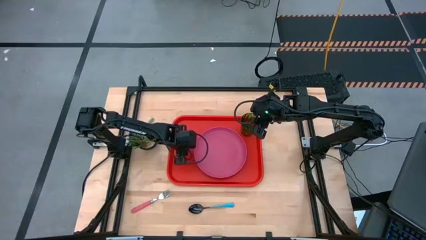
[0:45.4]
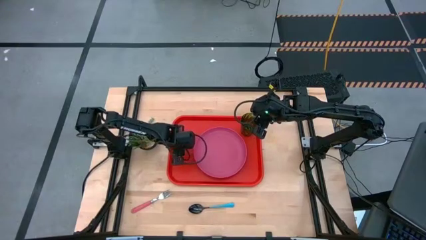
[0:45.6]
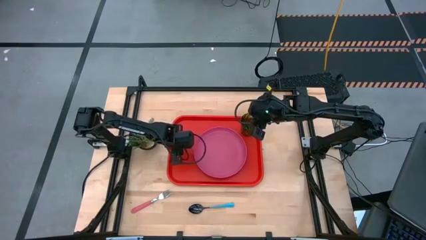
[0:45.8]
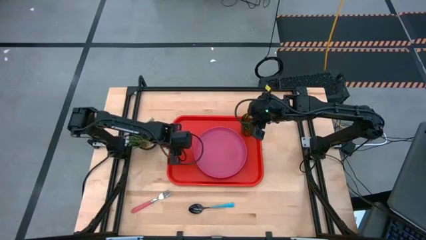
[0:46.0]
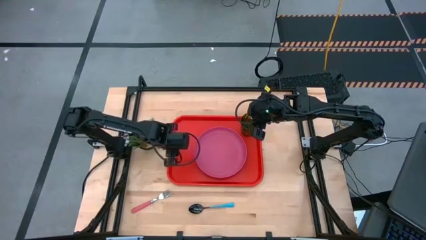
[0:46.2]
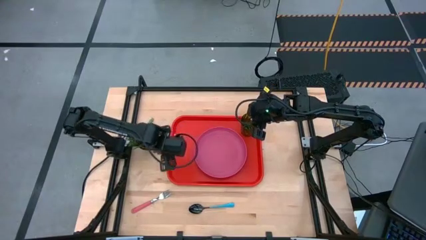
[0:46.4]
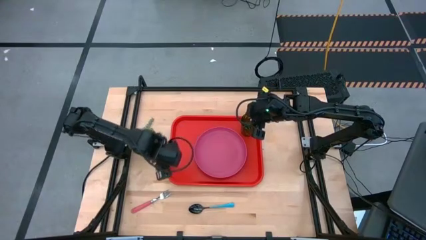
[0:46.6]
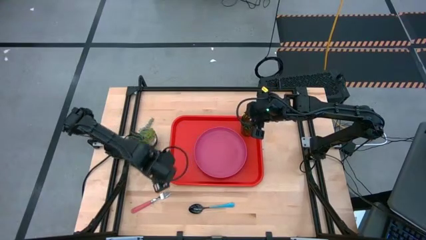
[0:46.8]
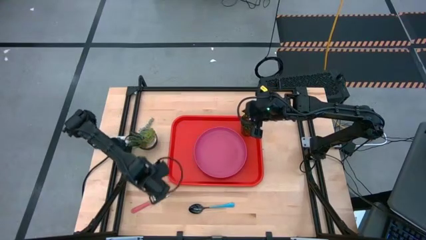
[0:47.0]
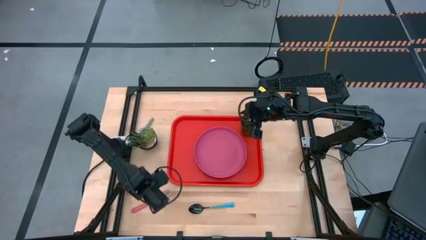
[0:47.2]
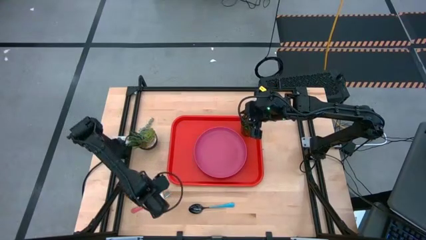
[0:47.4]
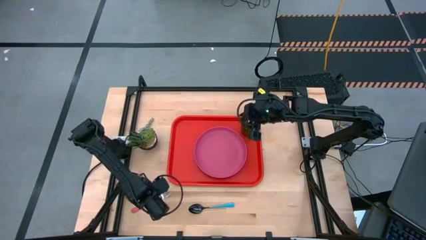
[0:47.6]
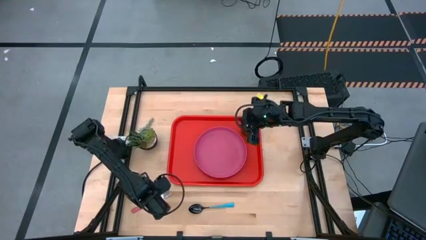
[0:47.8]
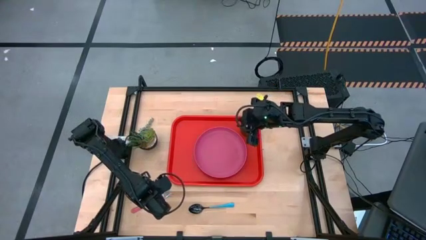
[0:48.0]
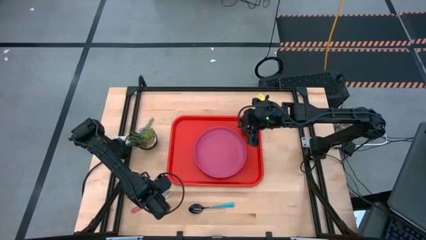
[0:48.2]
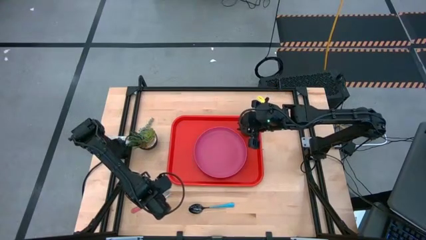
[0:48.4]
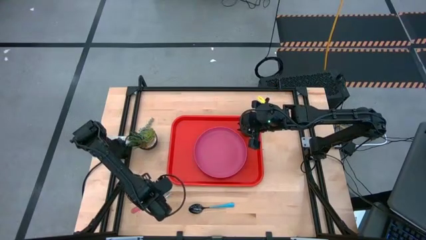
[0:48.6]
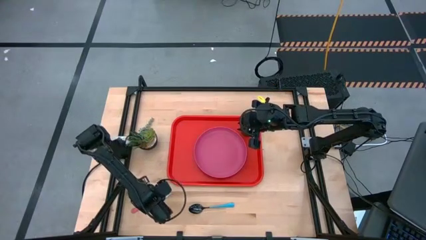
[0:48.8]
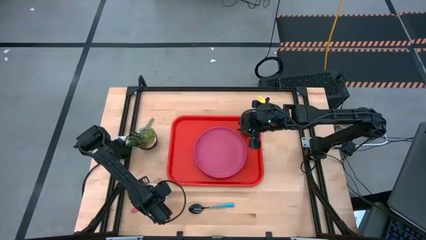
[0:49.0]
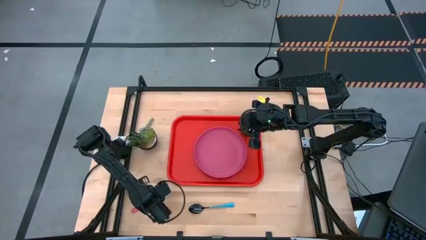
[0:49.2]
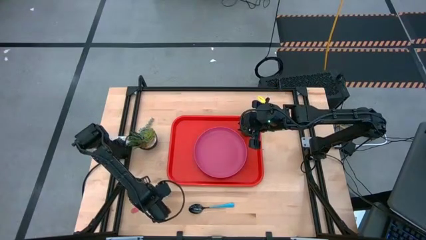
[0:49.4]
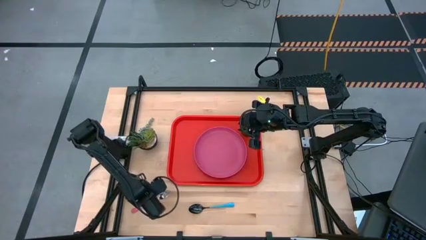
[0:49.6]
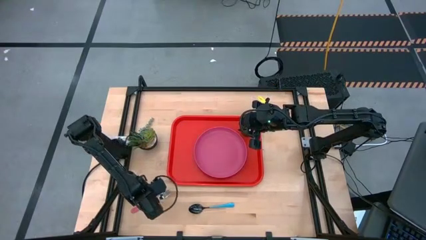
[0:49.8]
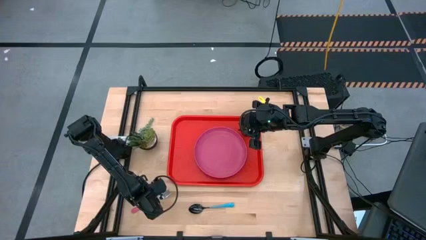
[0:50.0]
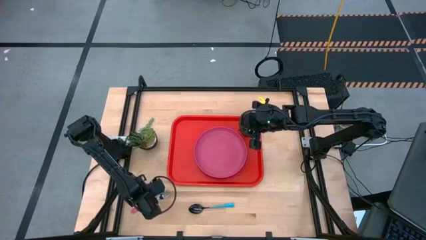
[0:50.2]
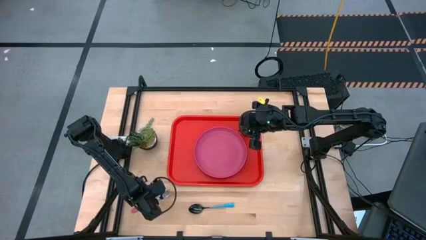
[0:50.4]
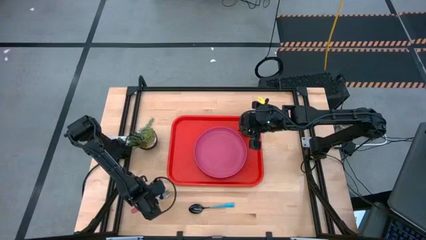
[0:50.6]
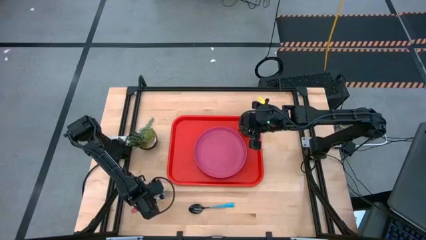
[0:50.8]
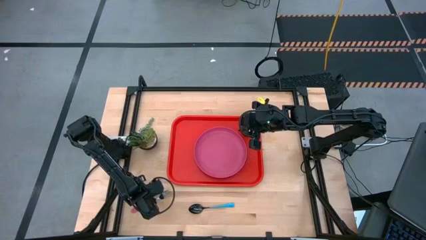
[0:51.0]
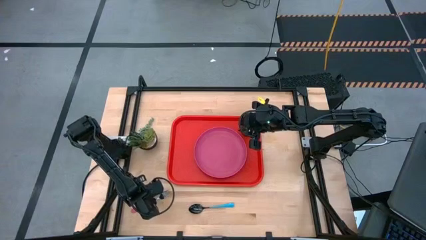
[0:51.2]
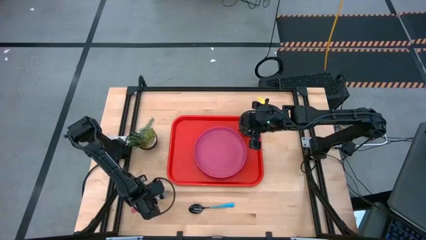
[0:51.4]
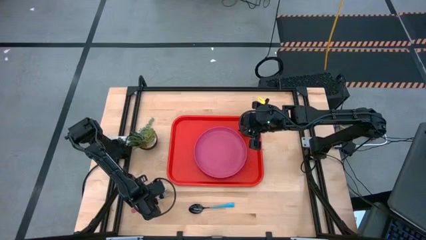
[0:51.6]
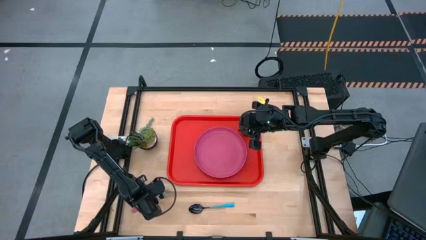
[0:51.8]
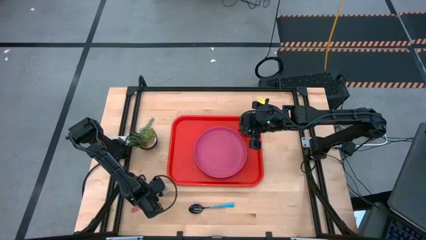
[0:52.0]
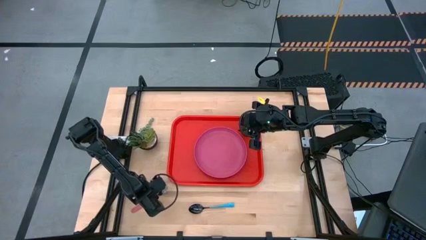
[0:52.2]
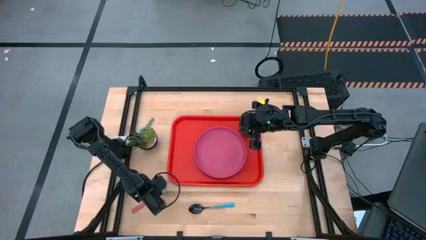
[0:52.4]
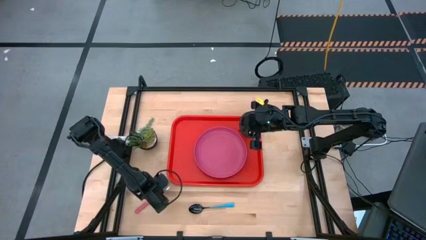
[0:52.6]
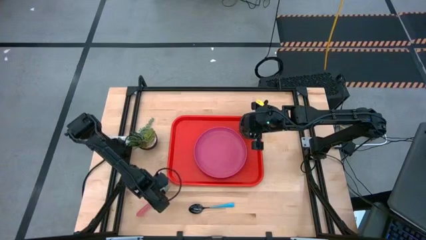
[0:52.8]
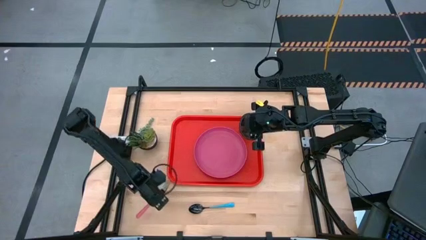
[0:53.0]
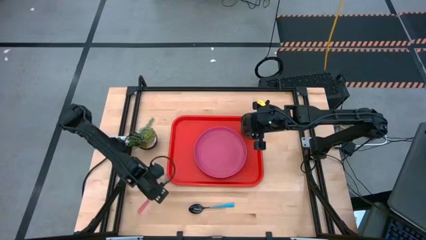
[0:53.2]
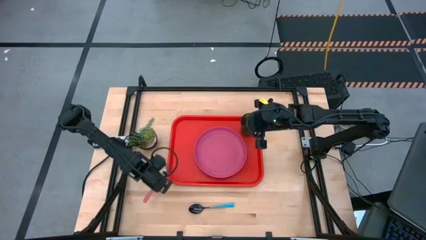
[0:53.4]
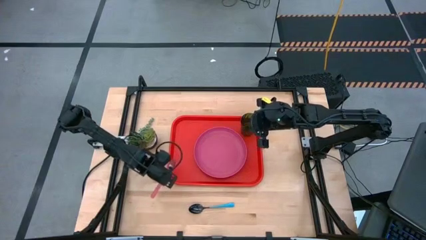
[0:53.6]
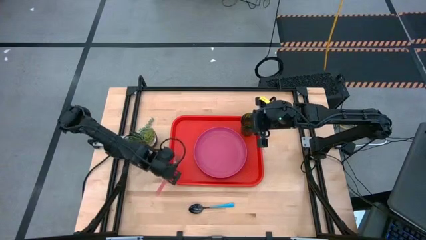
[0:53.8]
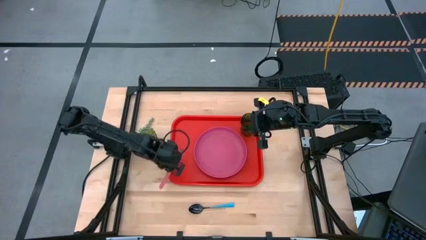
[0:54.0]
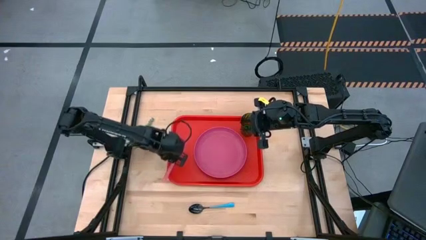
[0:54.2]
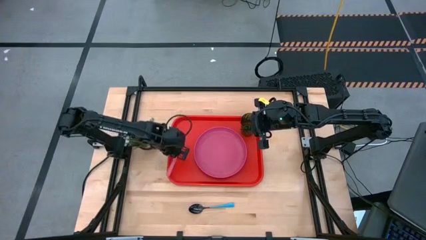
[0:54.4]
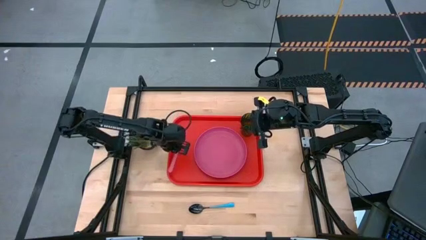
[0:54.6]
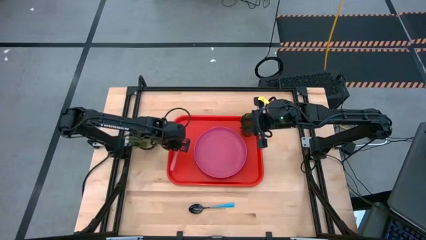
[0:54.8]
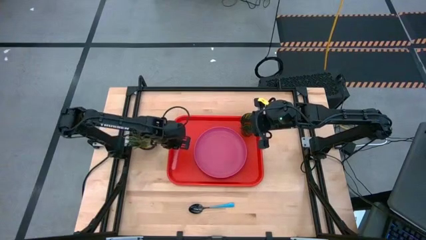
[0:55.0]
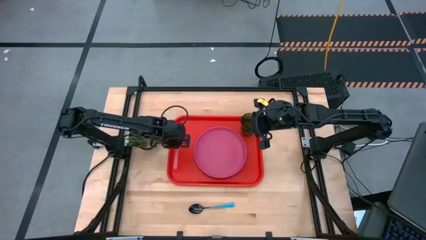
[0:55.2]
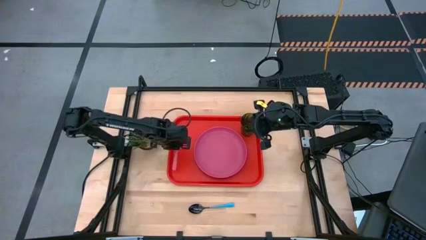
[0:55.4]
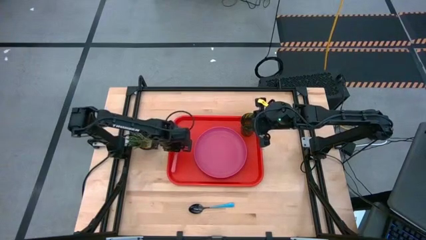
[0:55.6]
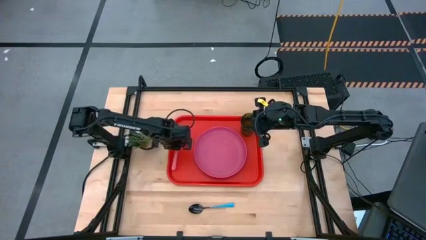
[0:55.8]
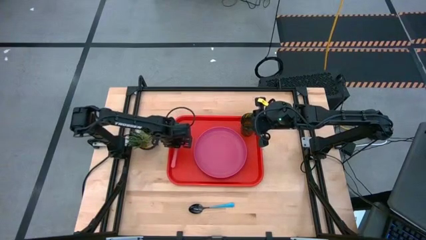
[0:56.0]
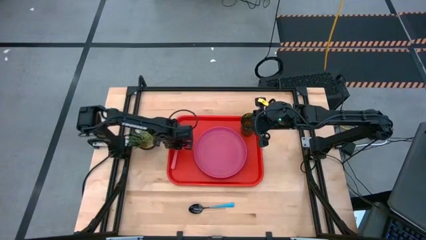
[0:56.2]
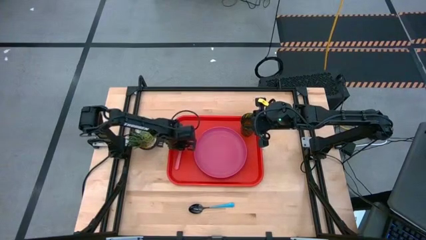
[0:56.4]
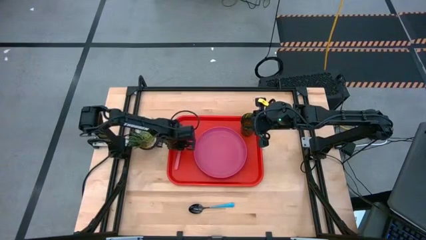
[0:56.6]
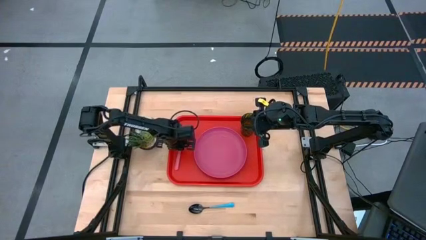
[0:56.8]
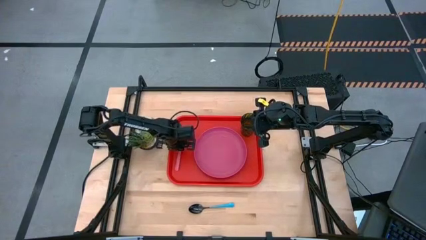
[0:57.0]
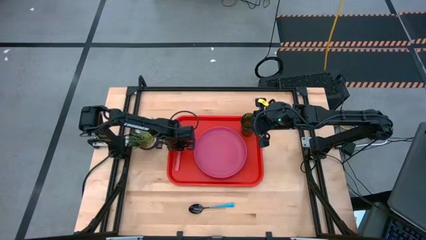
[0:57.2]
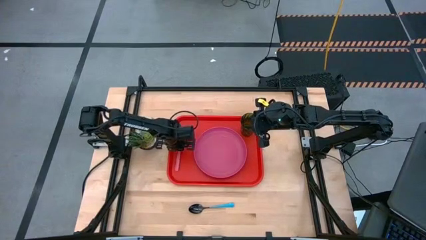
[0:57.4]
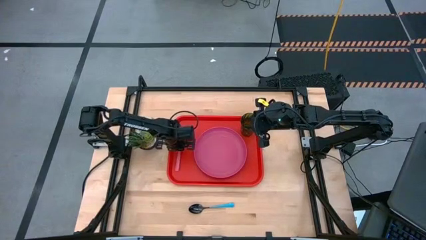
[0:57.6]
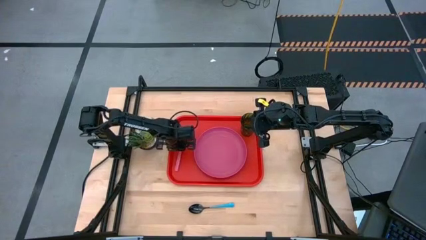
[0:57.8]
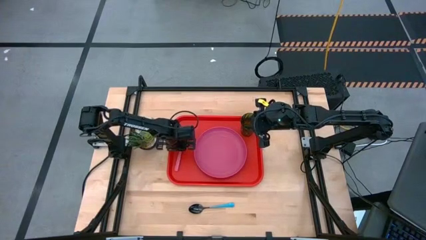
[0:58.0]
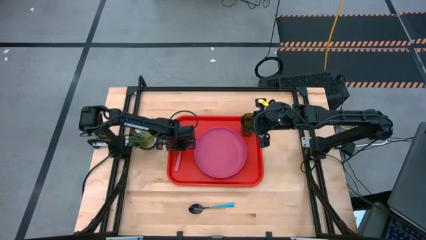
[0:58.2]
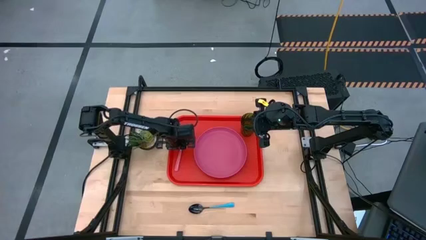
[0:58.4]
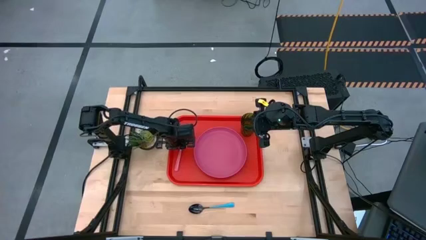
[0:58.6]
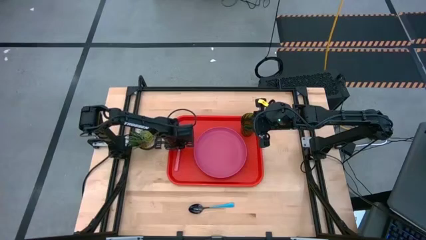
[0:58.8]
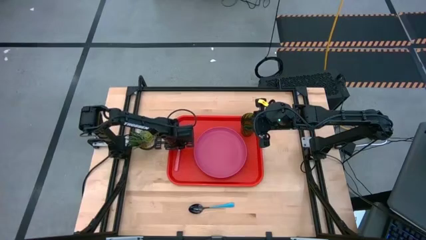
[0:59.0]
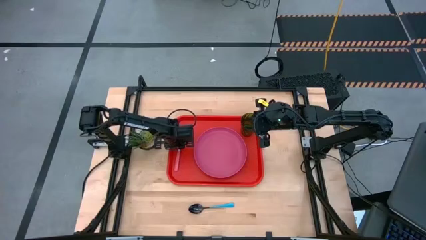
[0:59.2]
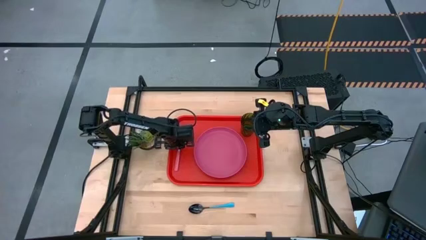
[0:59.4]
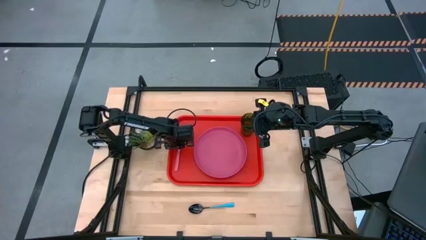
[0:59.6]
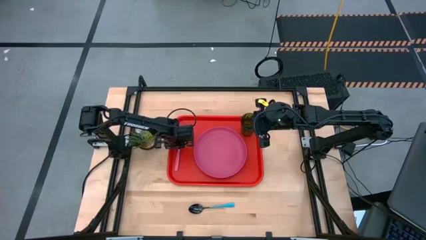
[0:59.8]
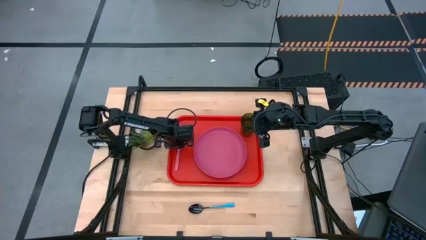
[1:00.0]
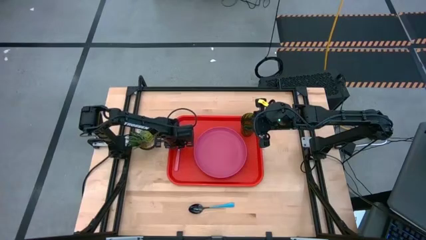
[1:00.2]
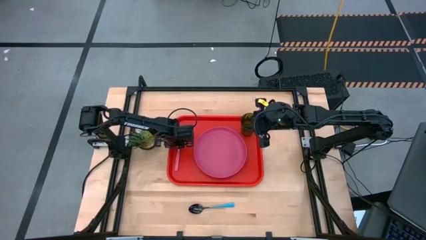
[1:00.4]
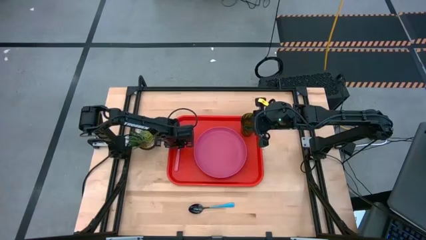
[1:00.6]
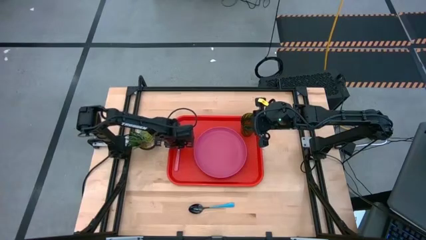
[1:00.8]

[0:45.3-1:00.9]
Task: Pick and place plate/cup/fork/spoon on tray
Put the pink fork on the red tray to the left of the pink plate

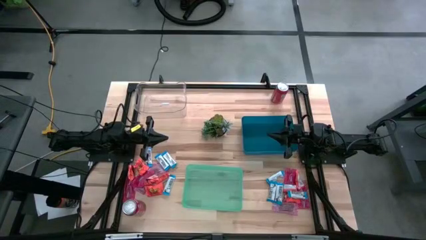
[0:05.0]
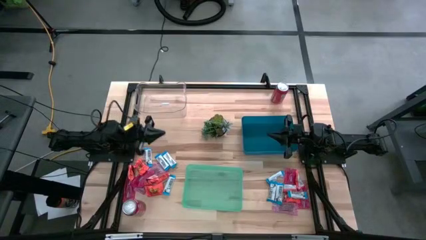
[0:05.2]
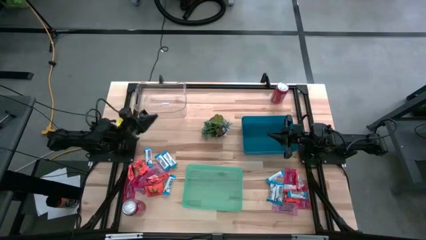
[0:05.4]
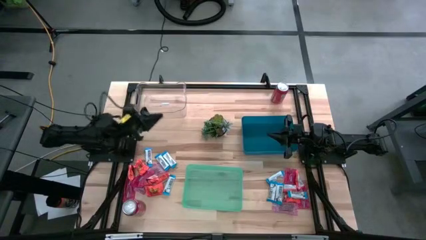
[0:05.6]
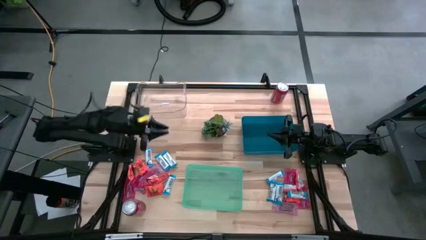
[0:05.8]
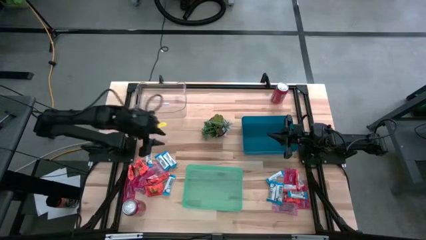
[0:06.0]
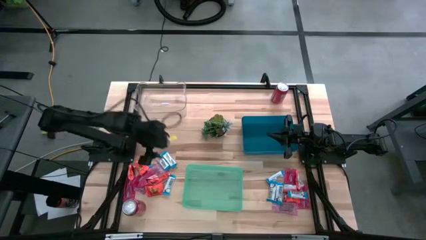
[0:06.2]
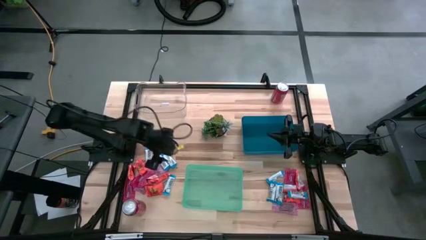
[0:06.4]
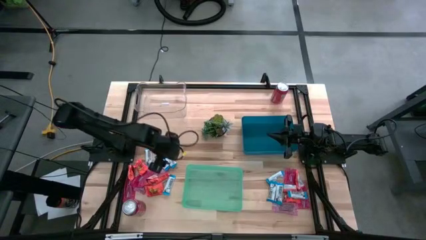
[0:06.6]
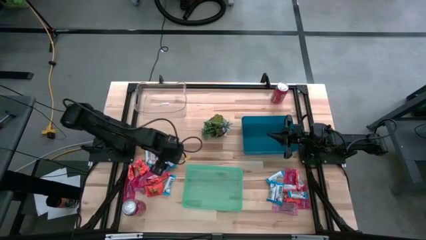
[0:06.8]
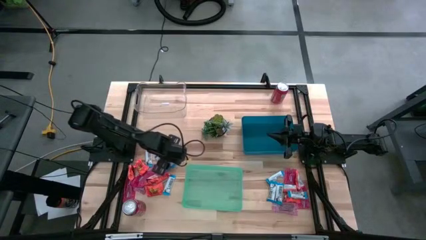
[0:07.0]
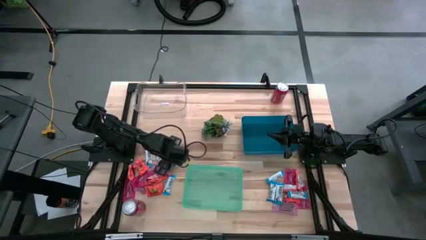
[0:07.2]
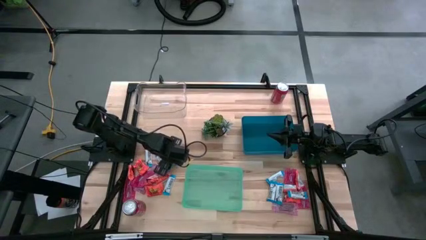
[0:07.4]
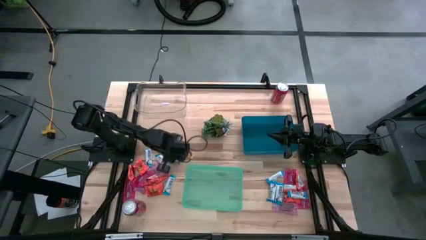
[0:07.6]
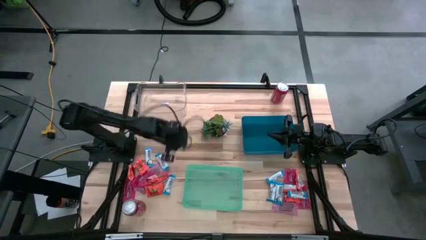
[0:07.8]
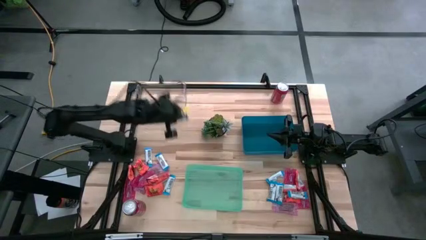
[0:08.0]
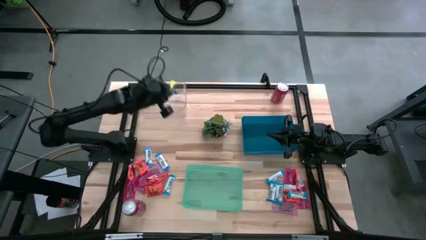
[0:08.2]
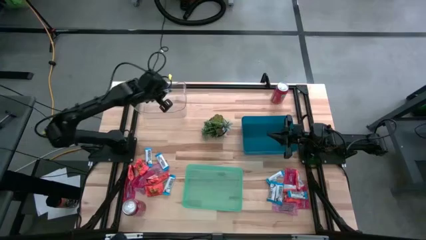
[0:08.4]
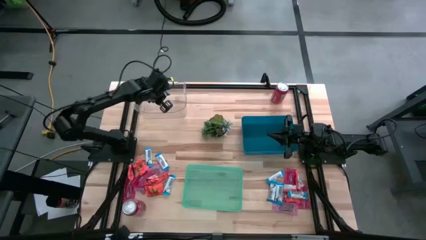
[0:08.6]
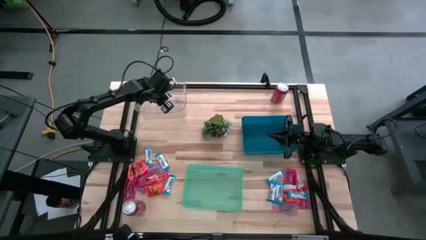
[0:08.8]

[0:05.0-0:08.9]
Task: Sort candy
Put the white chocolate bar into the transparent bin
